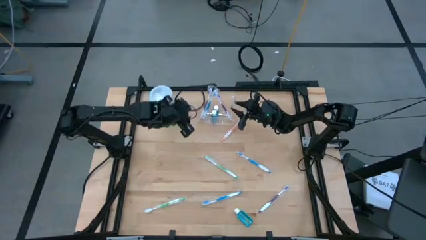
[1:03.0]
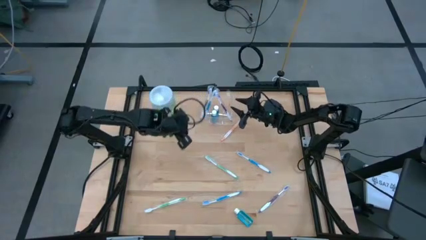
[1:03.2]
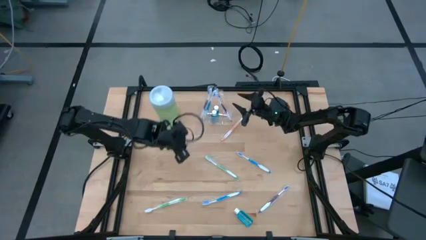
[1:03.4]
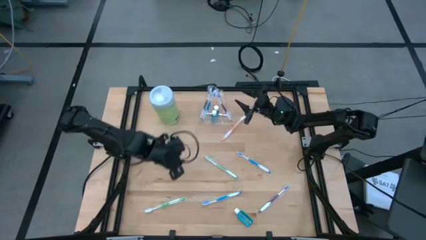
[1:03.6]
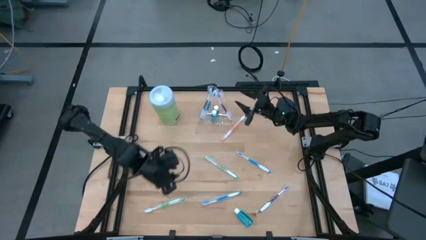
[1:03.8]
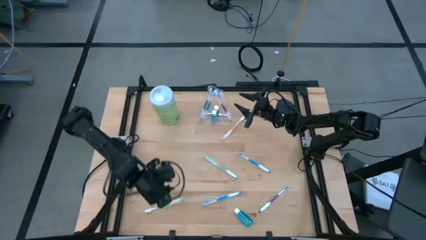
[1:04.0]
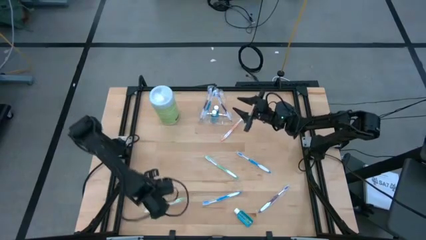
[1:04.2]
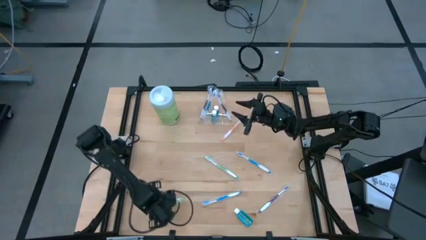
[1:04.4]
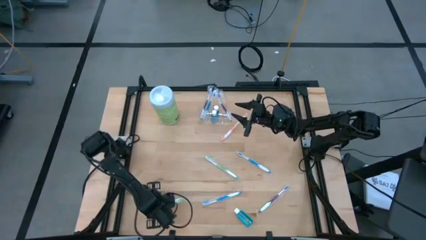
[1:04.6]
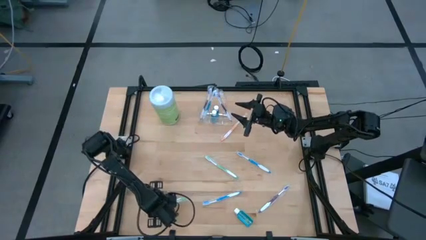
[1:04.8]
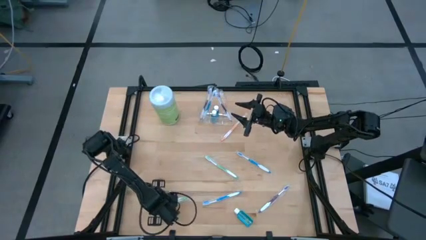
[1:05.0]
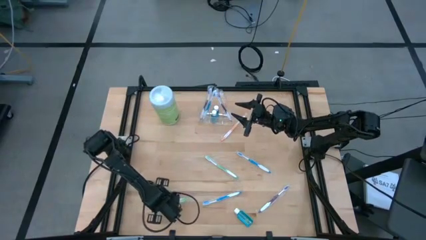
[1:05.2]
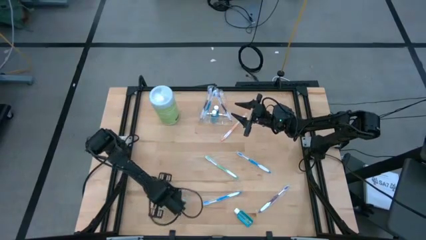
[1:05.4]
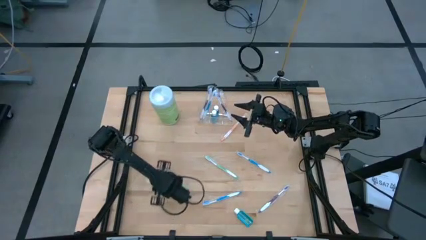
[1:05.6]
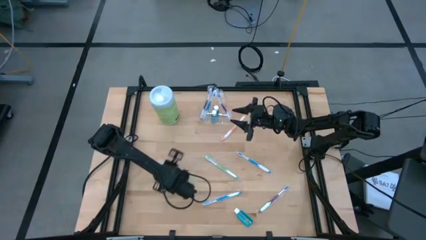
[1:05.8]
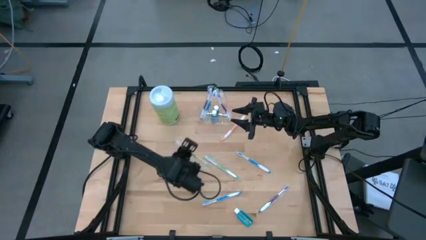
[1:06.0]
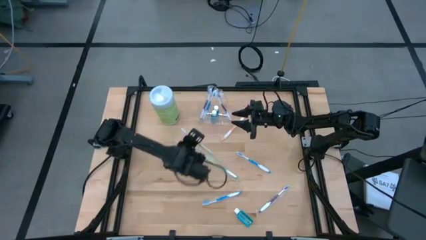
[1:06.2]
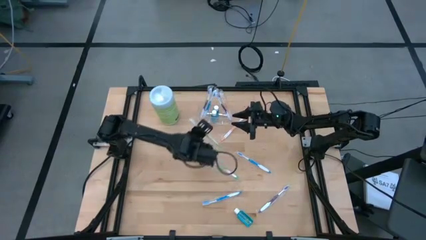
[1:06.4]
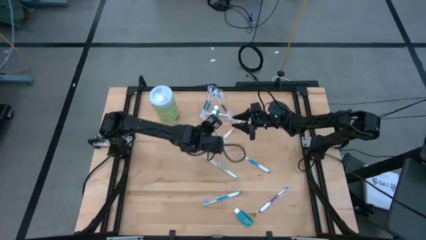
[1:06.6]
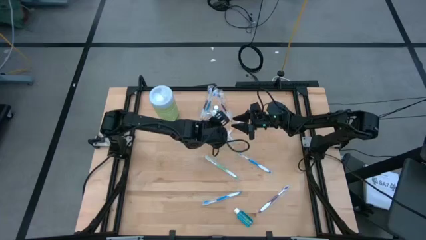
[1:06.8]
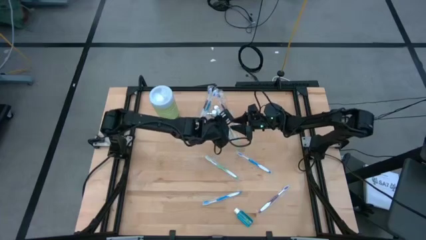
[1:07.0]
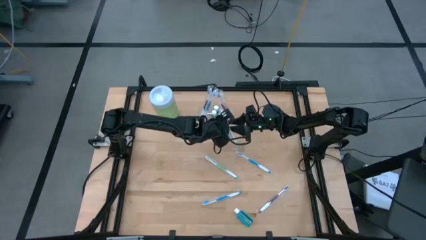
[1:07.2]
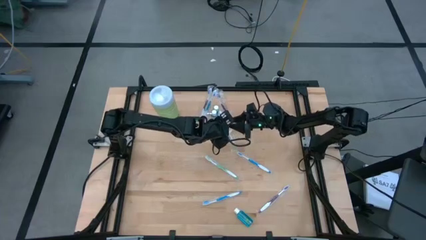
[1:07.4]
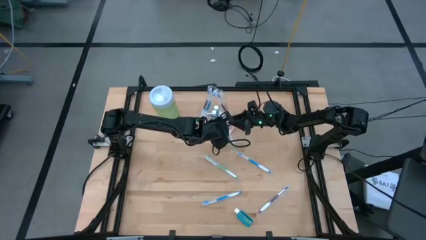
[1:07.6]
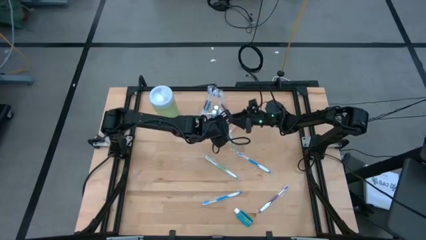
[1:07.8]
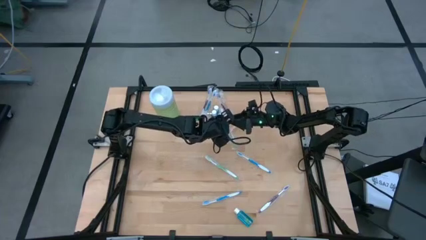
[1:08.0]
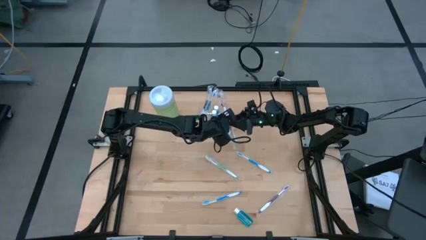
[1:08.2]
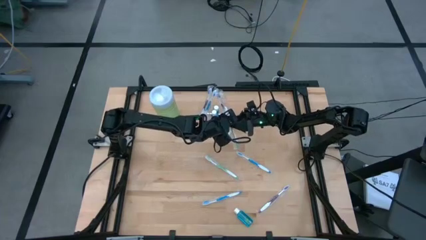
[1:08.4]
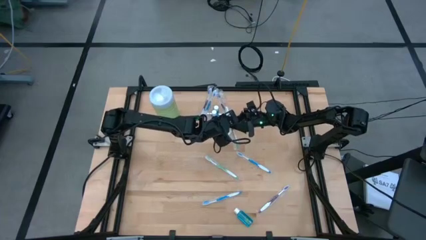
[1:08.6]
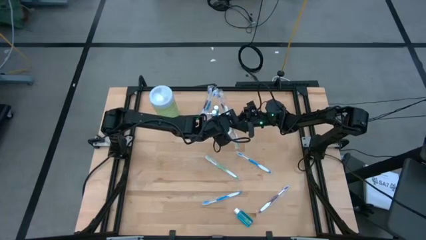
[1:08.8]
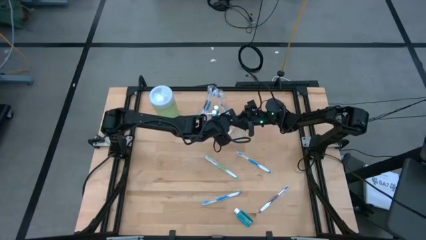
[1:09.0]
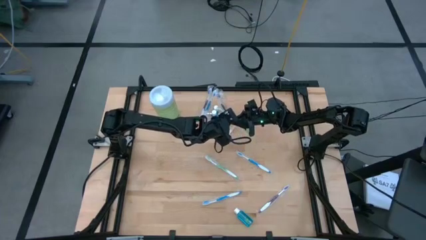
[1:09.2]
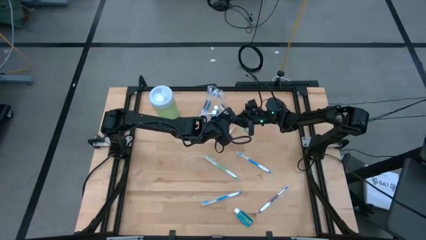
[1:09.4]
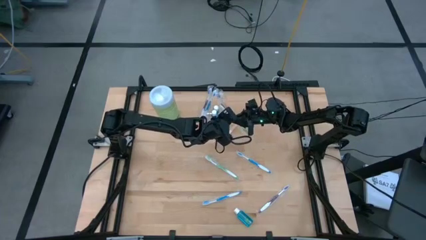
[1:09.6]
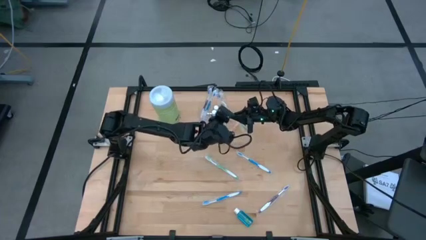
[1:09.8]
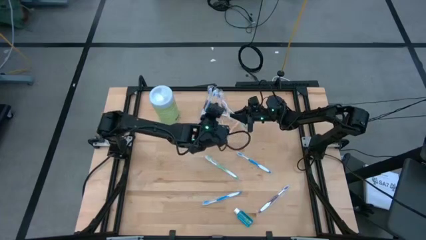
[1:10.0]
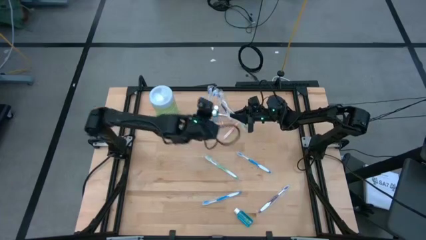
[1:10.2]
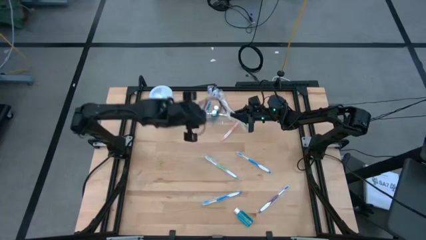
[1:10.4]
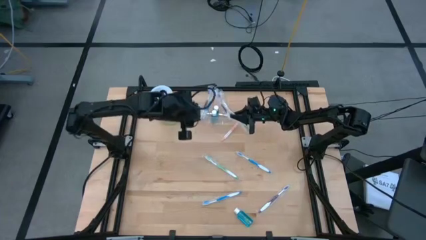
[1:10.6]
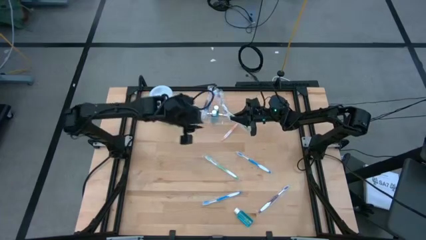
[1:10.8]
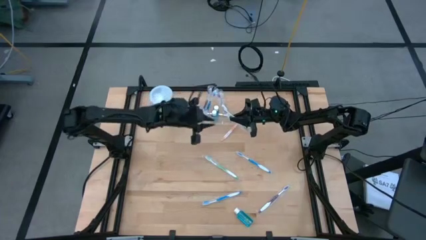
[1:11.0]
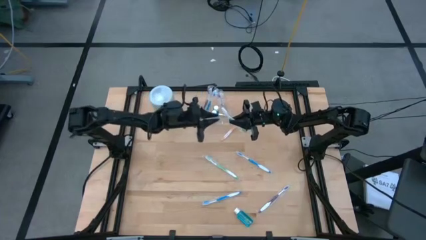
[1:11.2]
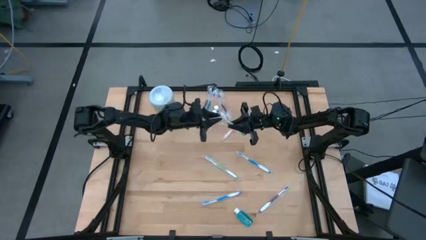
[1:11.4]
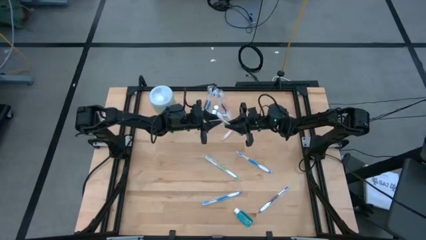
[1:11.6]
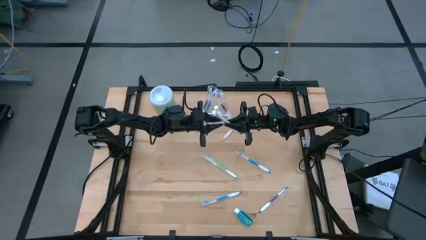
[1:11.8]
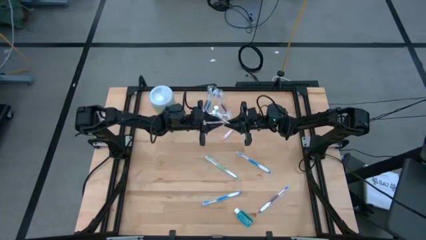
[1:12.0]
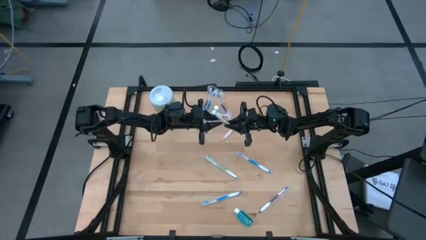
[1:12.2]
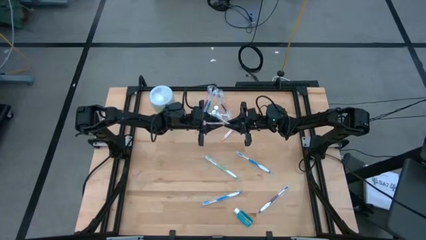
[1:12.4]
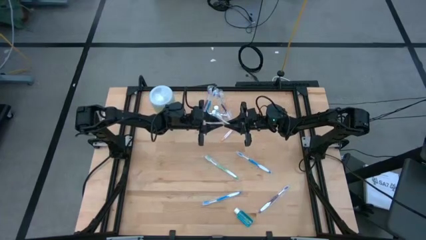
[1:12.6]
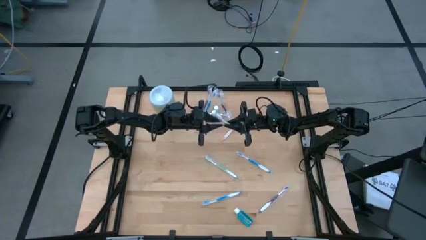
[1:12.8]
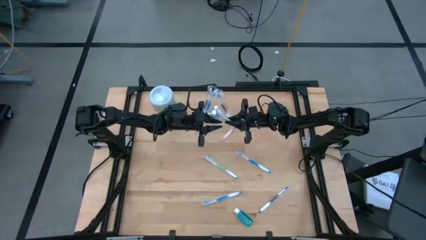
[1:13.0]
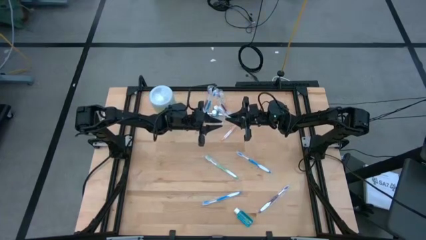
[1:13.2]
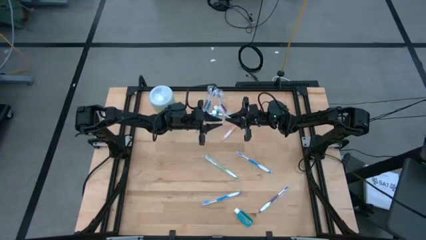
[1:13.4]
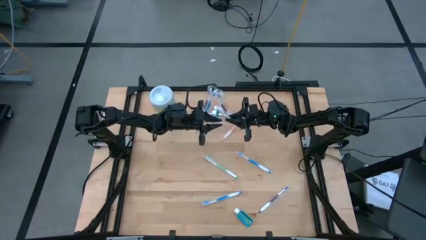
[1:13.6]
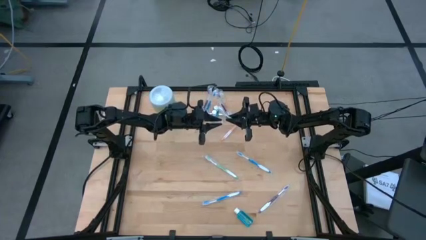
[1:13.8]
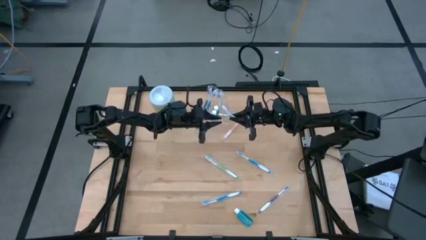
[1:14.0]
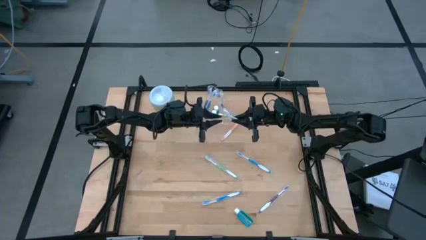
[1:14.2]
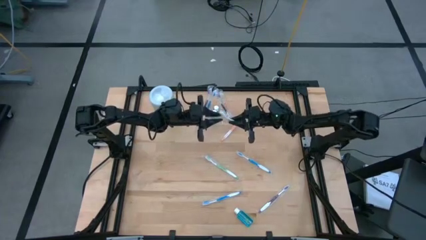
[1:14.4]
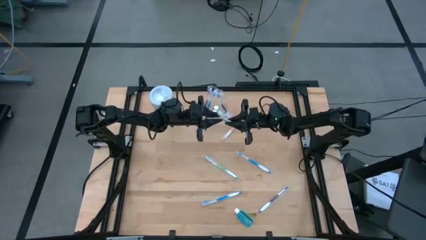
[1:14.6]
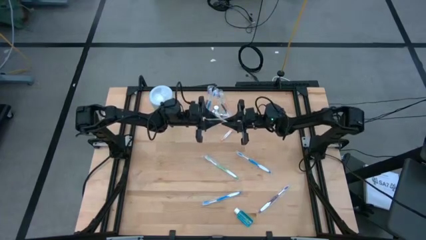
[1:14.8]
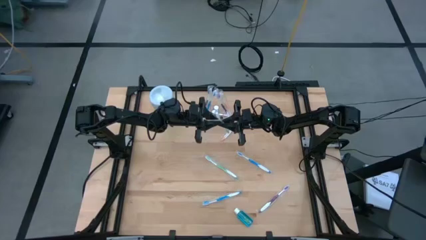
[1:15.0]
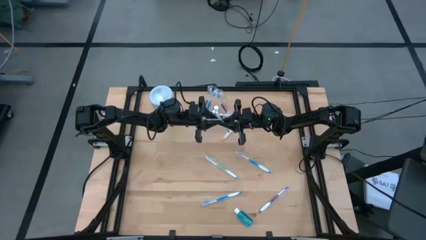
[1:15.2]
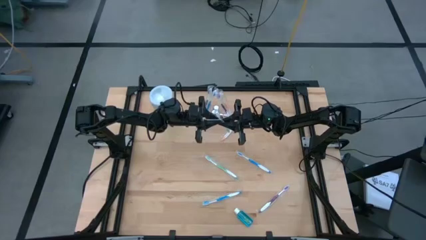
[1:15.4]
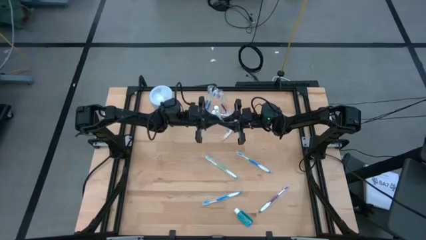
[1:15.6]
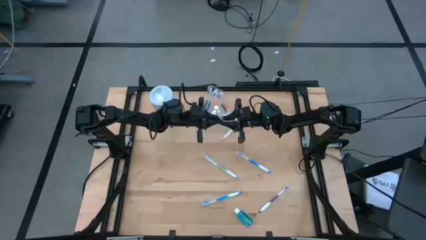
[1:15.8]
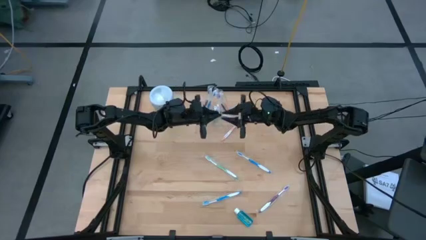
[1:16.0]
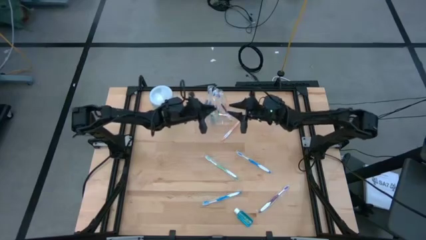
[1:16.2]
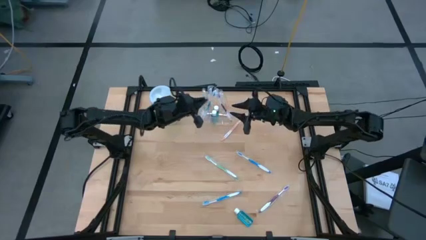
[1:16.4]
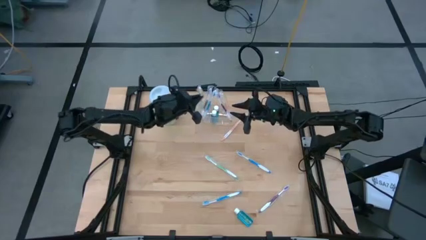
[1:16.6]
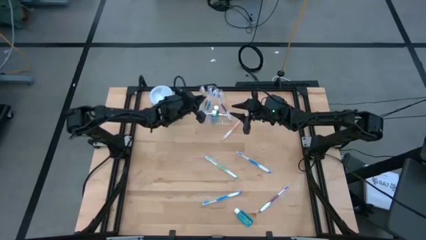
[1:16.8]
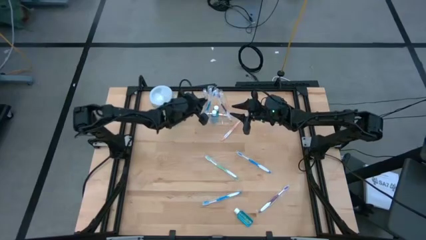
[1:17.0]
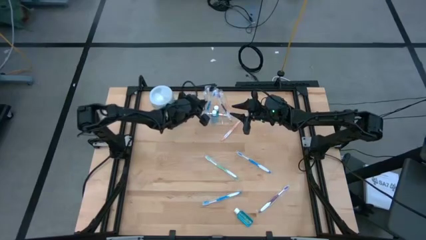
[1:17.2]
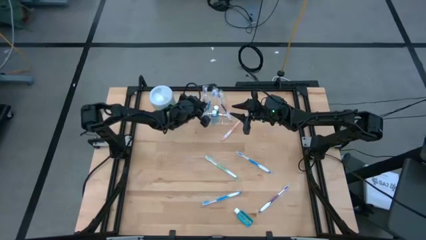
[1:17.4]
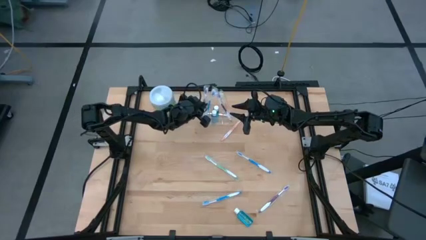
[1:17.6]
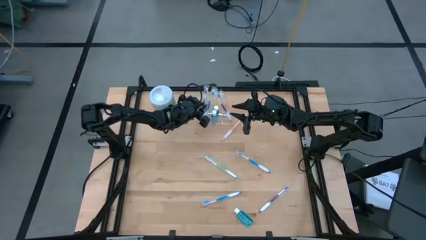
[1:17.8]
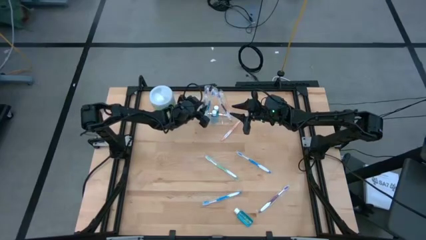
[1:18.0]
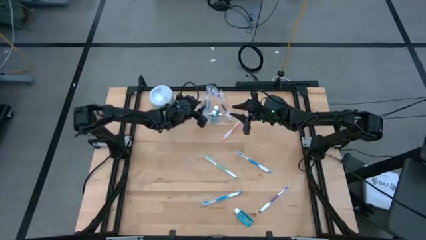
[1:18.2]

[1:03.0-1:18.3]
Task: Pick & Place toothbrushing station
Put the bottom green toothbrush into the transparent organizer

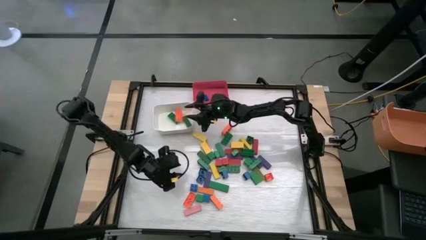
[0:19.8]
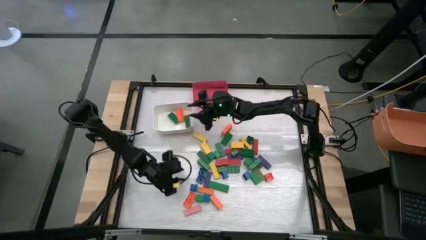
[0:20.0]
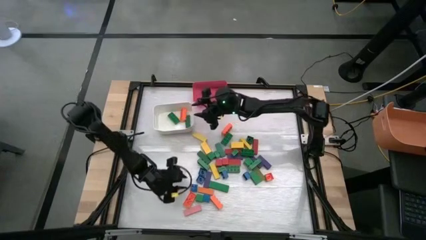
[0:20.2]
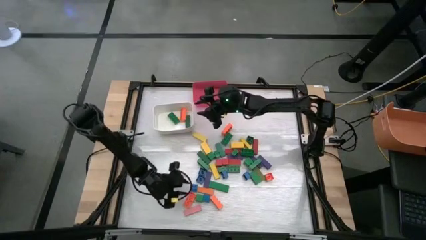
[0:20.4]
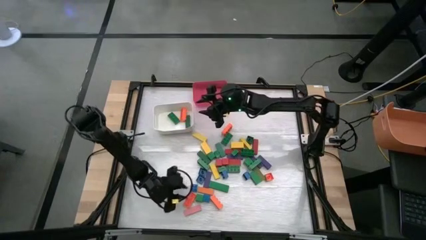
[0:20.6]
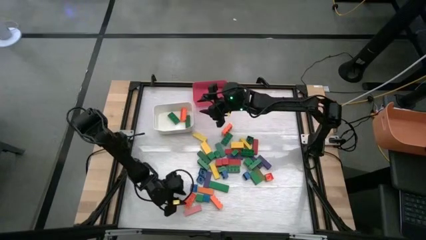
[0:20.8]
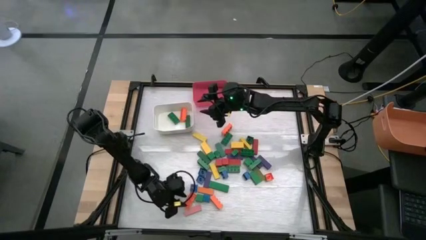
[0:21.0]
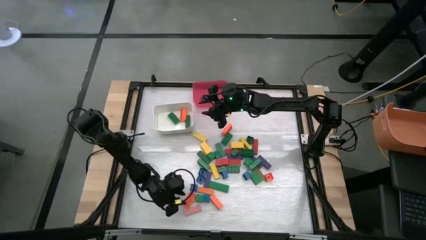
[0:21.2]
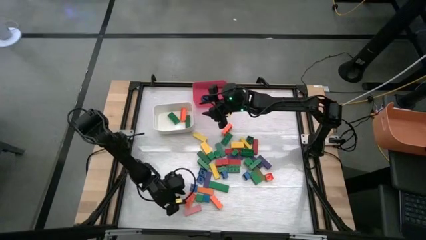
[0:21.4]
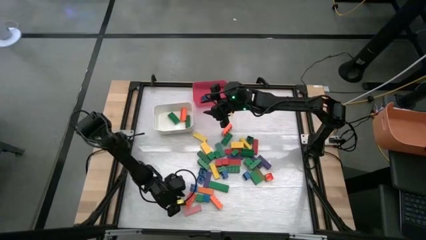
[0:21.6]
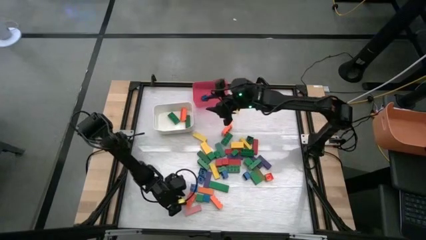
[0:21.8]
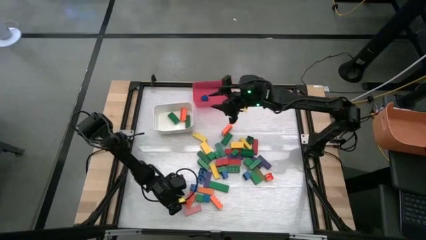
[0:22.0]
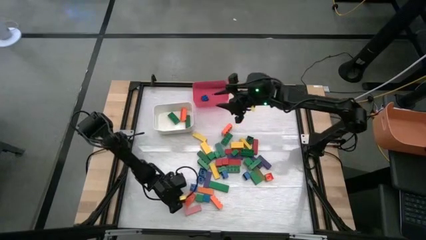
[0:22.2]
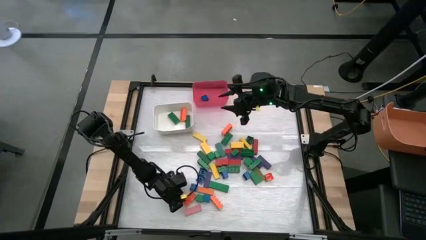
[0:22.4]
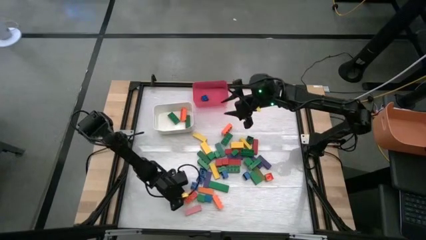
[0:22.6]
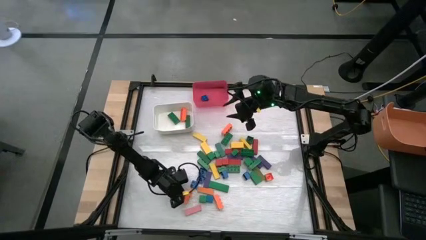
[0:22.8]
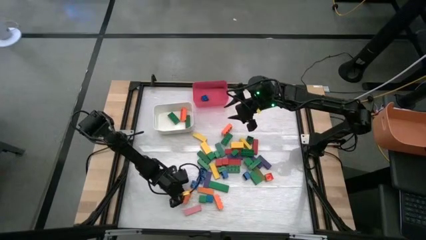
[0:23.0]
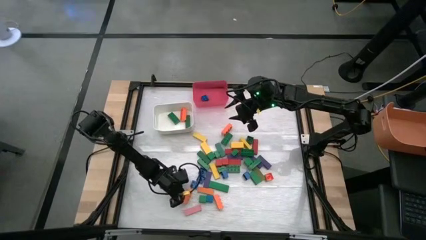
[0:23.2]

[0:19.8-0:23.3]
Task: Sort blocks by size
Put the large orange game piece into the white bin
